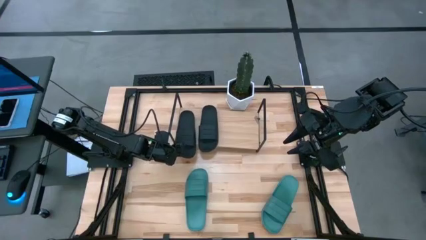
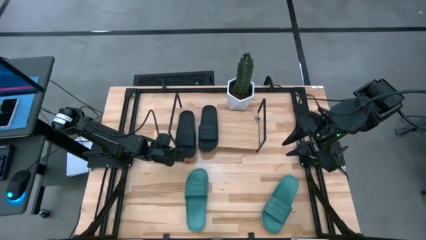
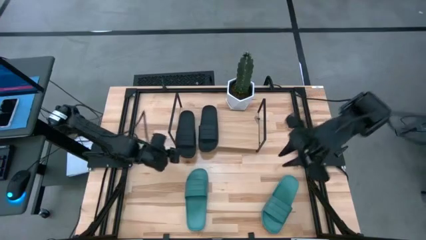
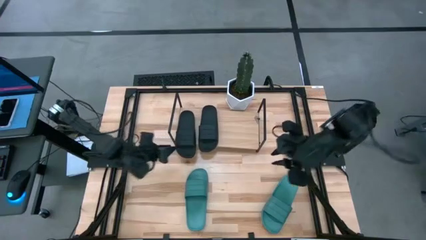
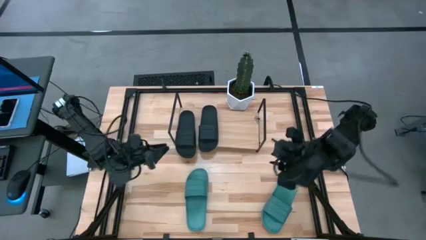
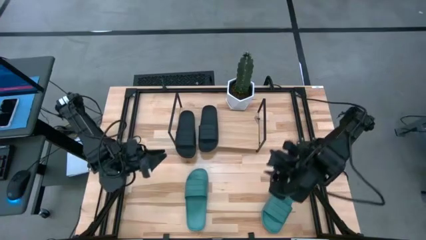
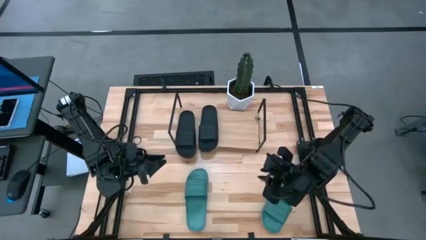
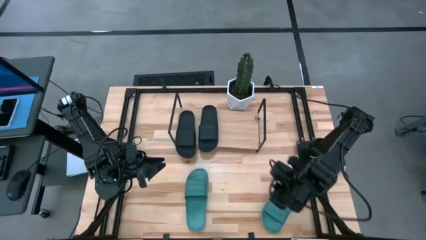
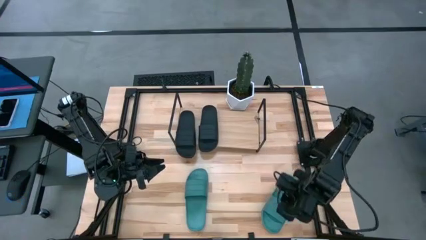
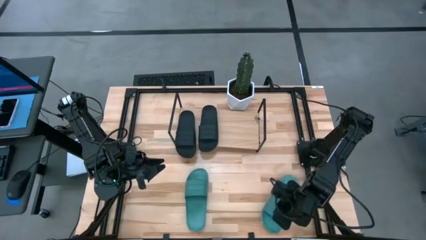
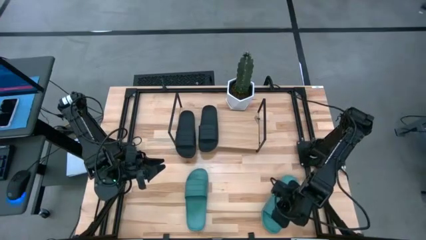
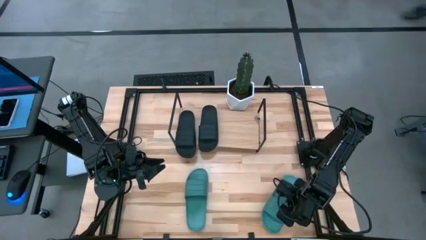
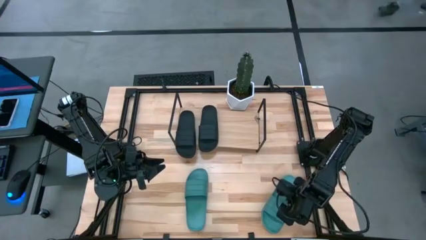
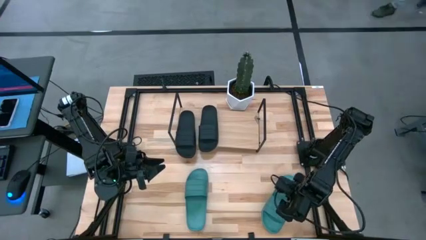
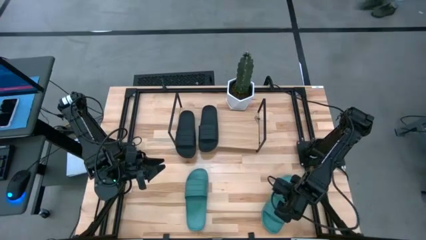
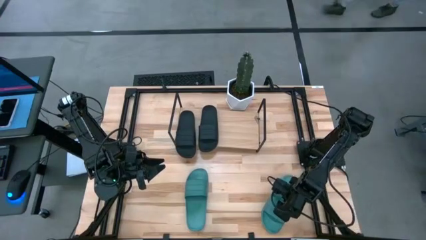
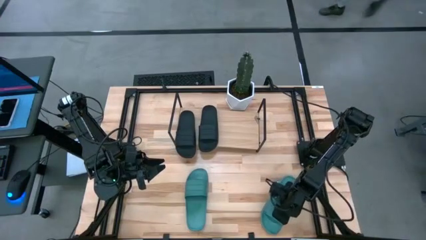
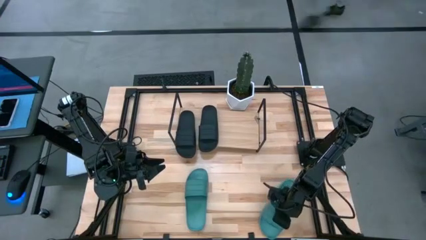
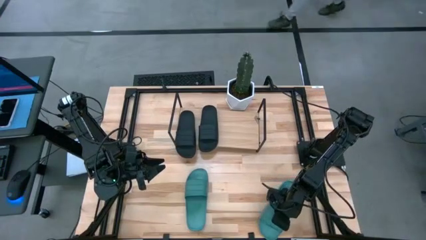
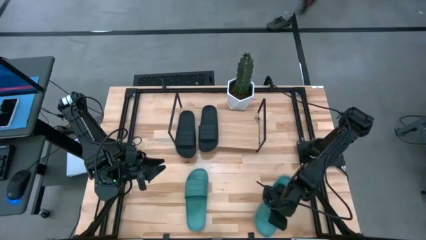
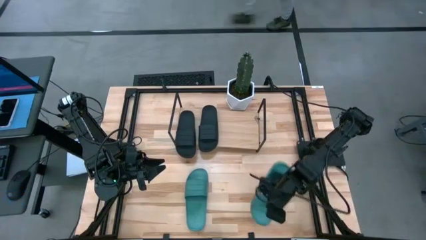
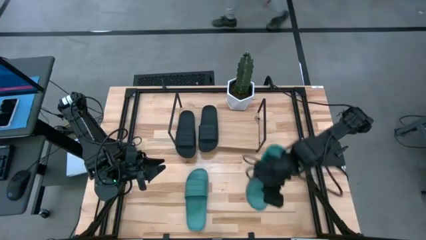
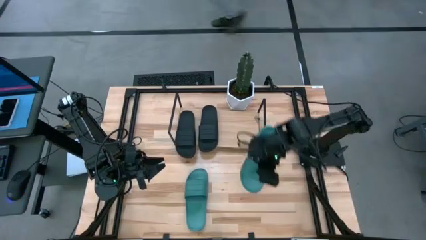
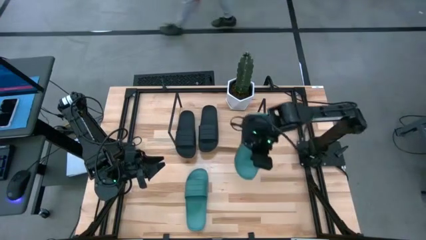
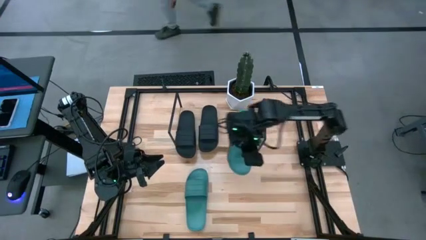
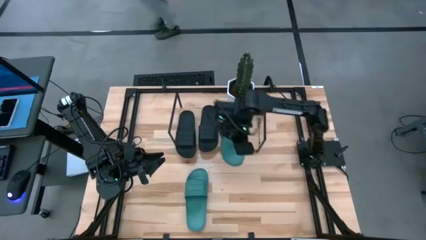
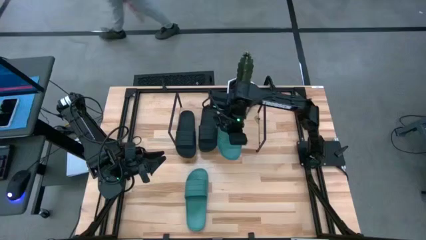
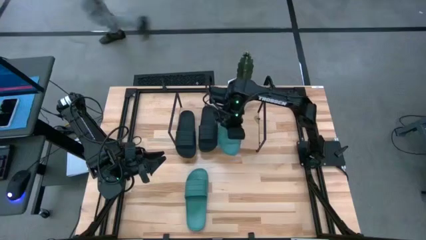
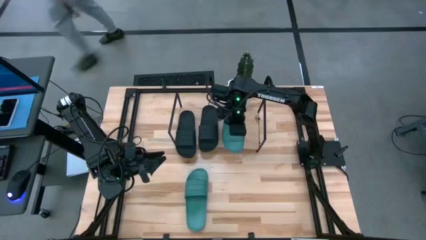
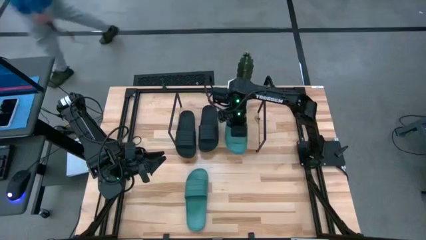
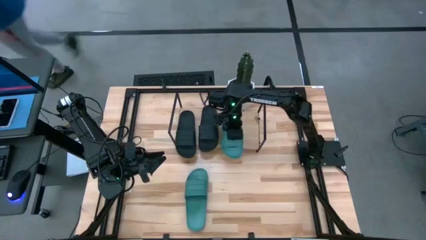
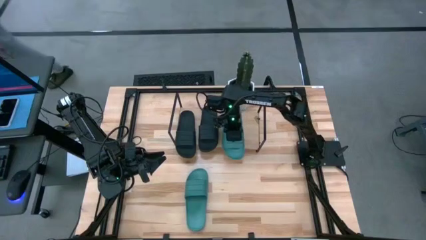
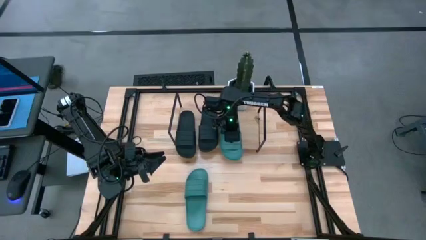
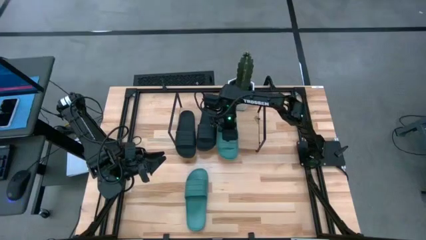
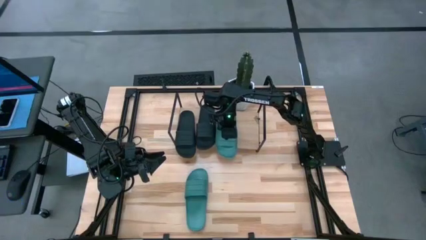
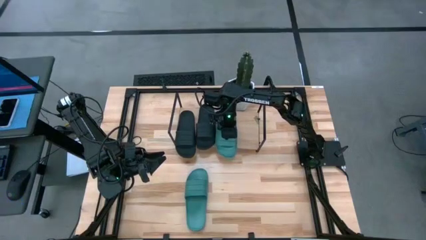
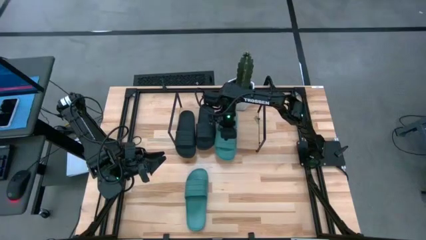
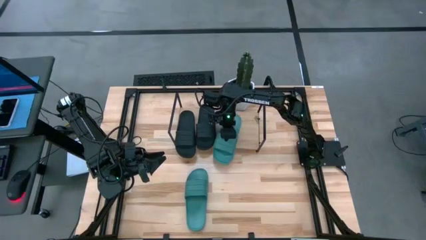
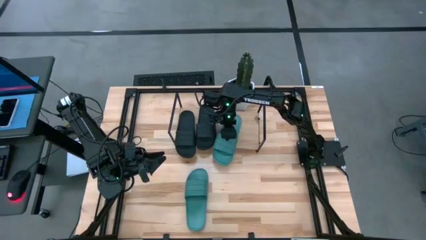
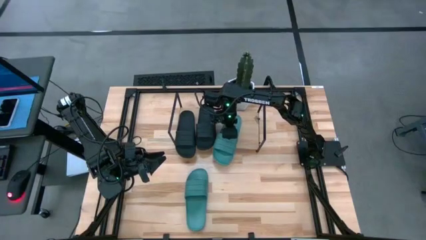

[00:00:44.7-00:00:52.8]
Task: Pick and place slides into the shelf
Put the right green slipper on the shelf

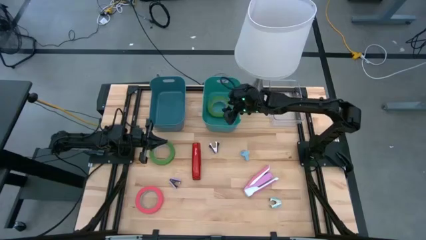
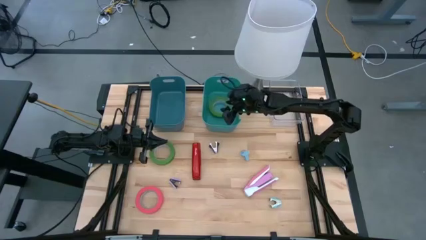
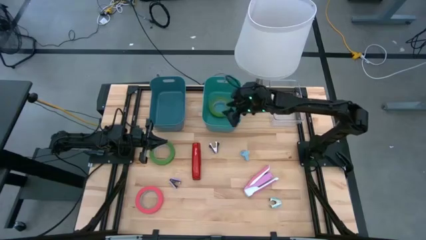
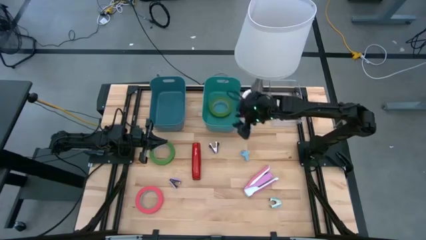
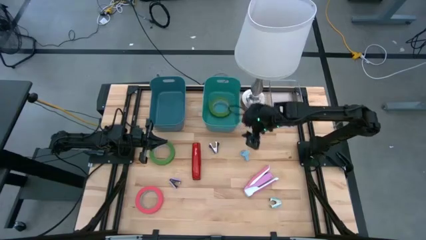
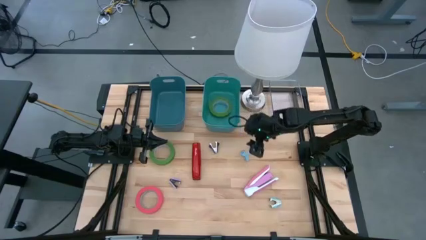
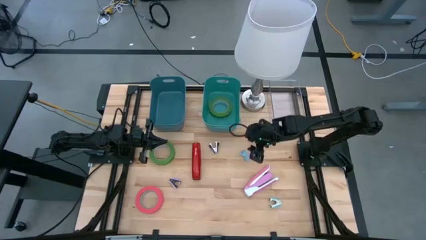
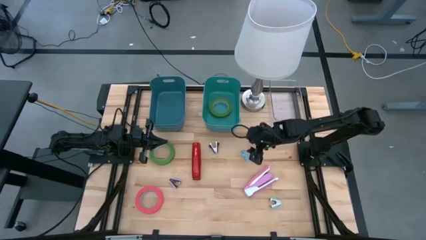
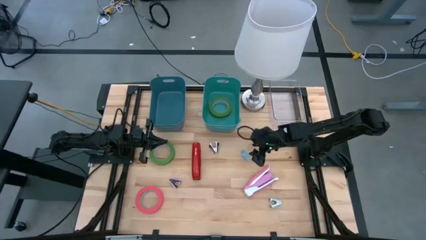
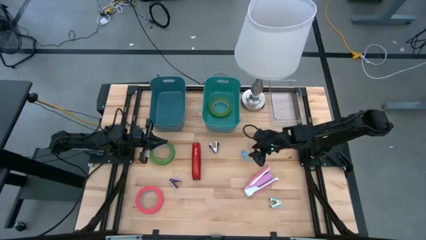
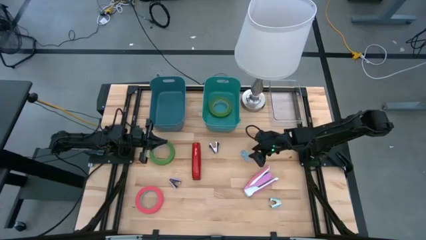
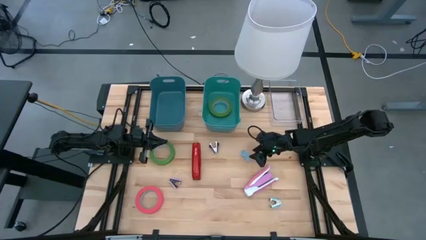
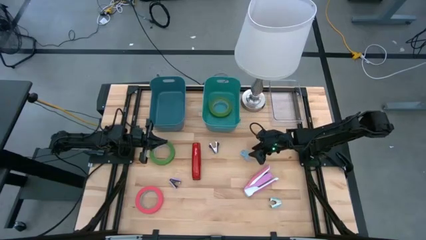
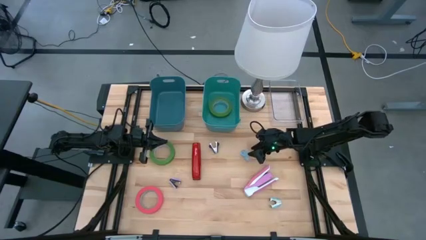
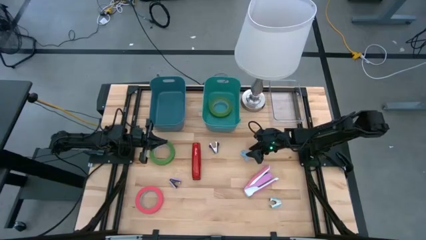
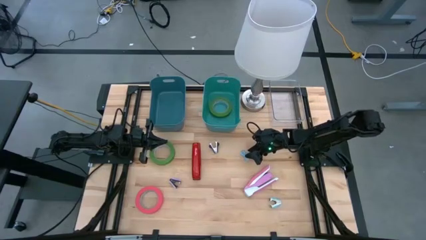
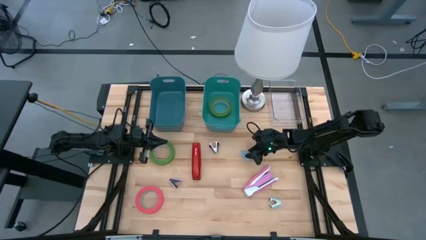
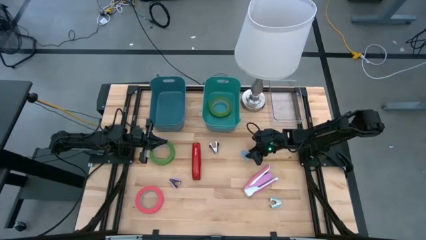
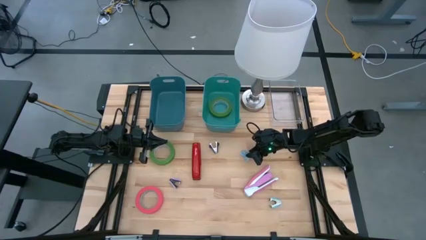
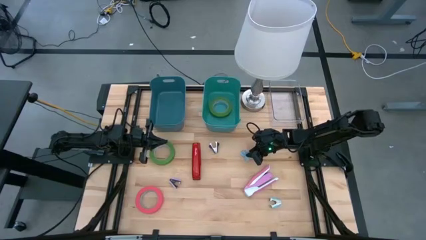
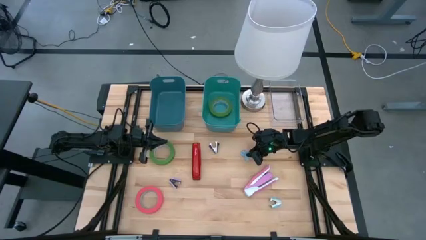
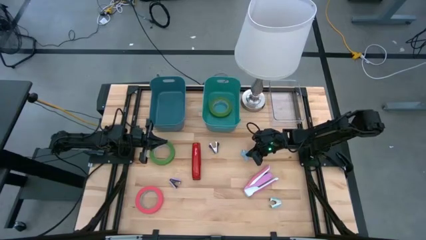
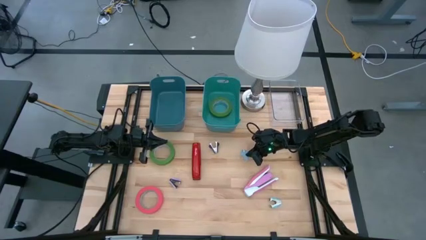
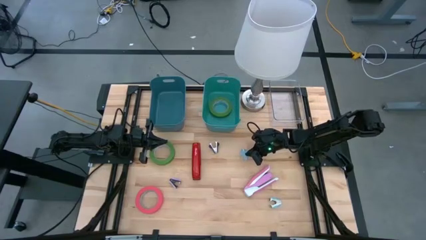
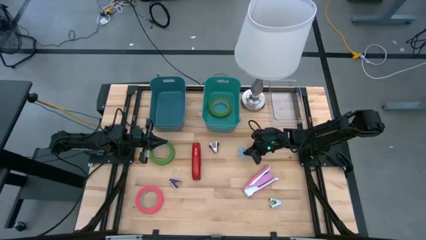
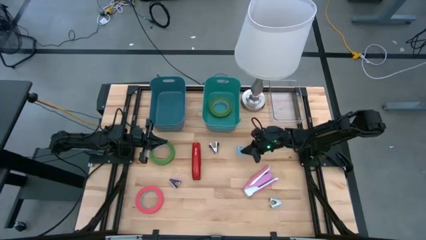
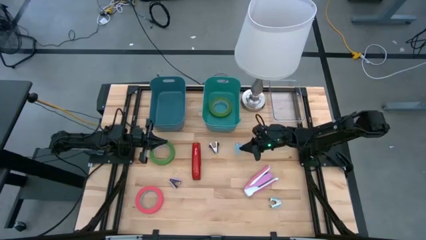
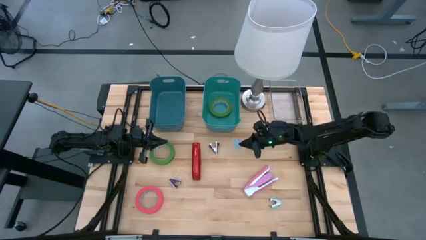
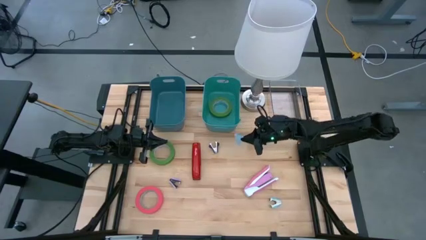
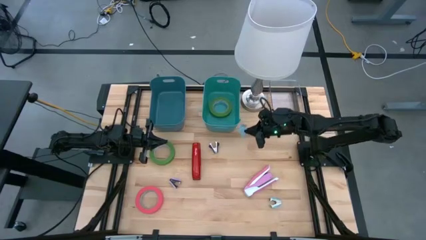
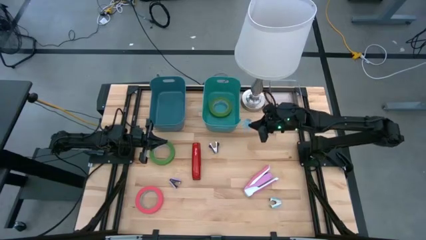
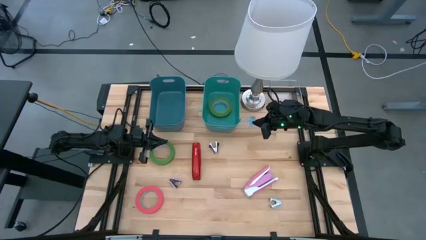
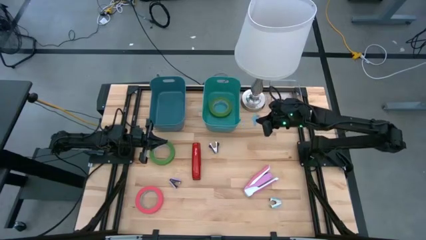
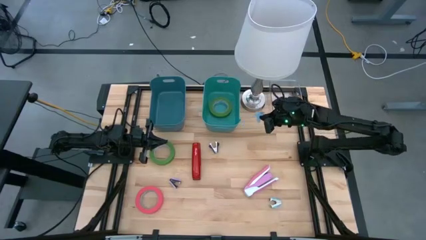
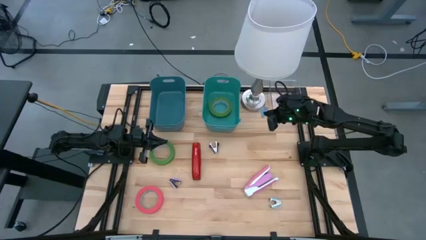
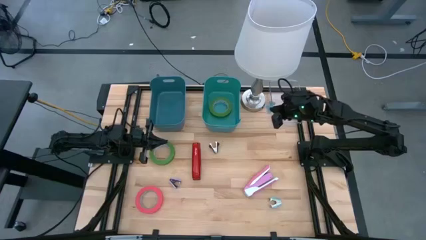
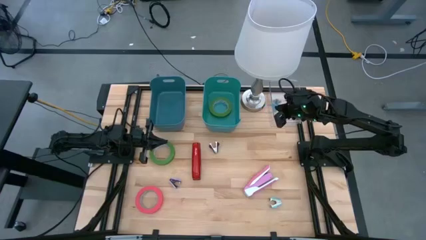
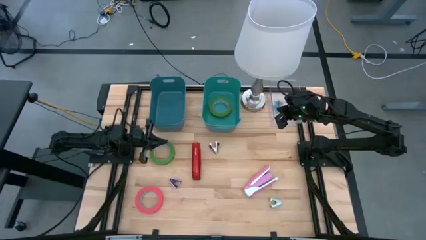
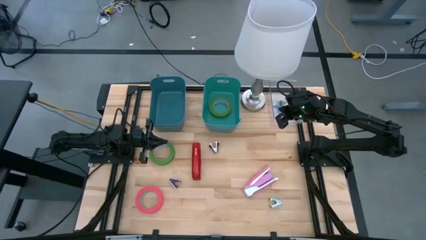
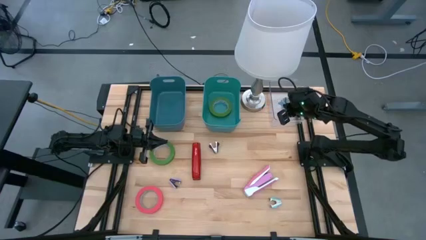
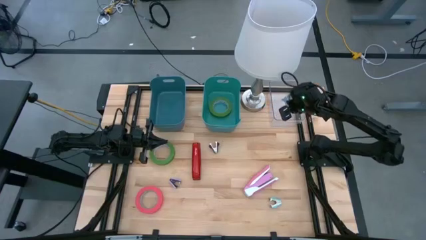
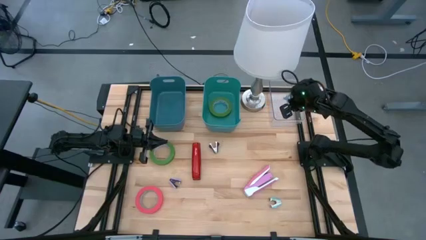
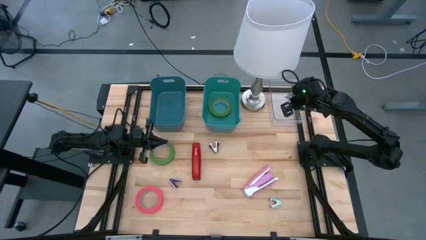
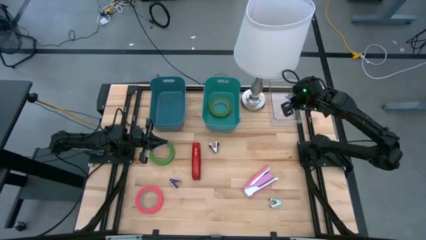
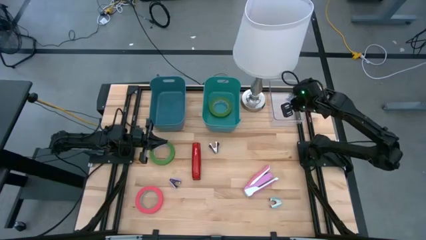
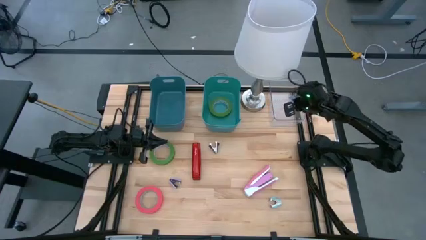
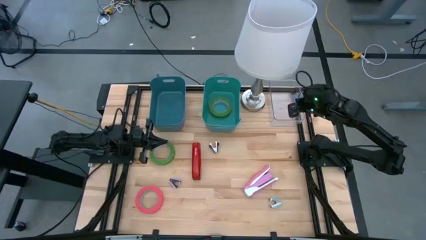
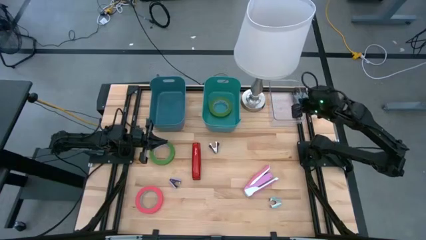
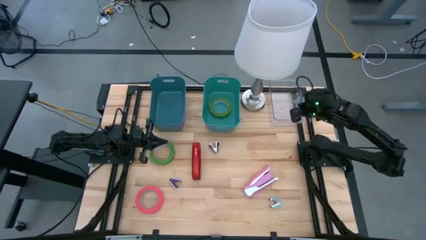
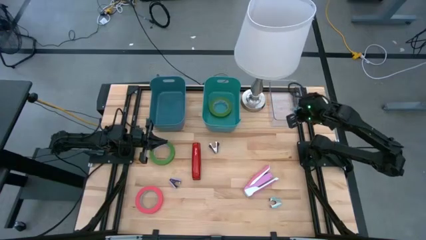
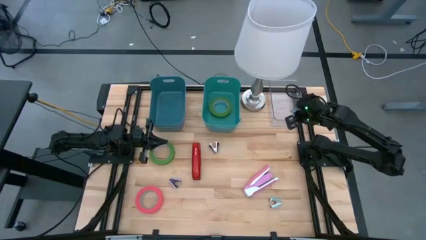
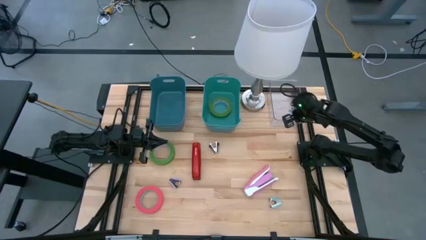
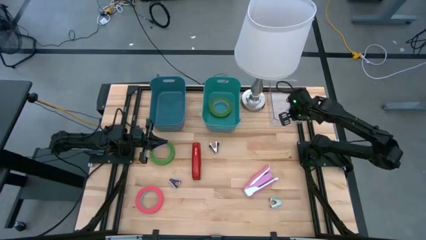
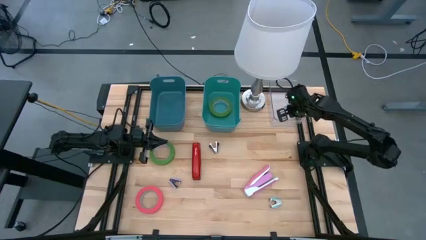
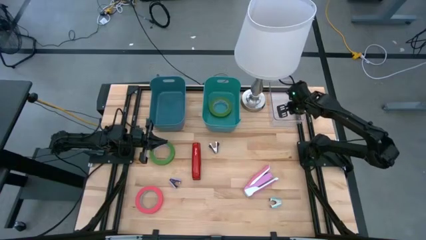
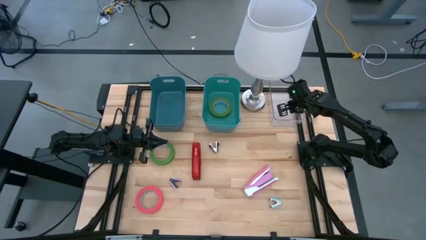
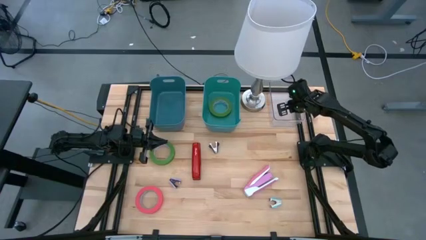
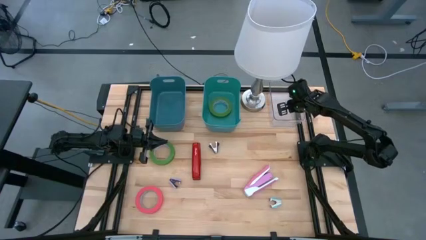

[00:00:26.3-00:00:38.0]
Task: Pick and place Stapler, Stapler remover, tape
Put the blue staple remover into the transparent bin
